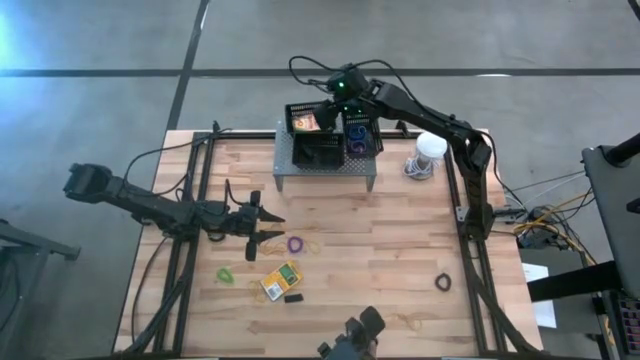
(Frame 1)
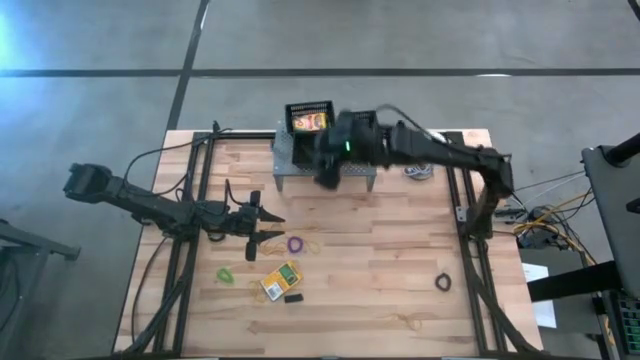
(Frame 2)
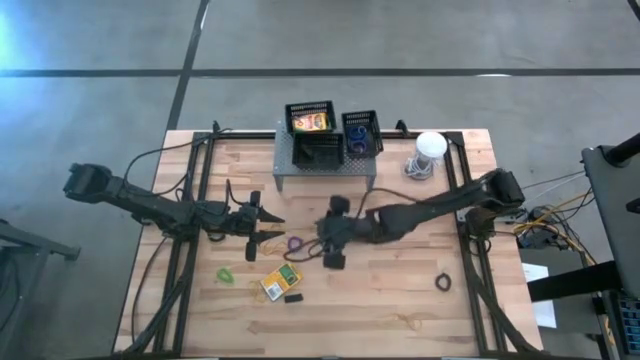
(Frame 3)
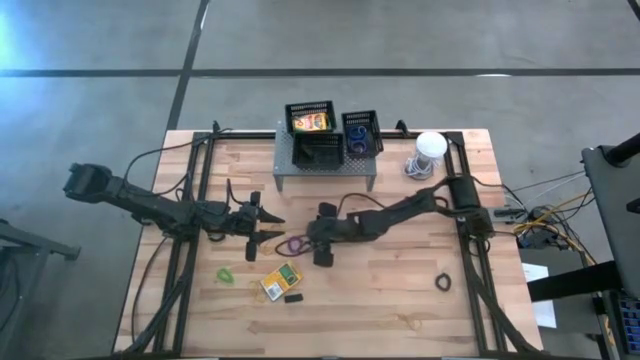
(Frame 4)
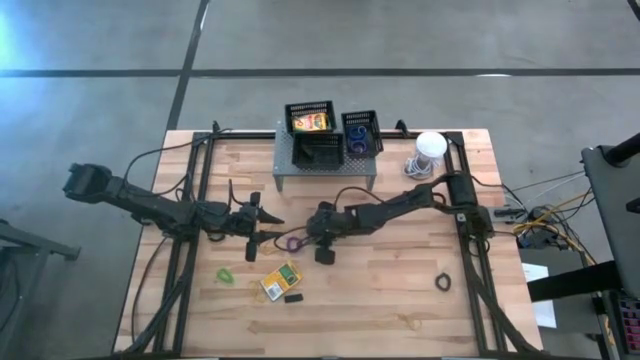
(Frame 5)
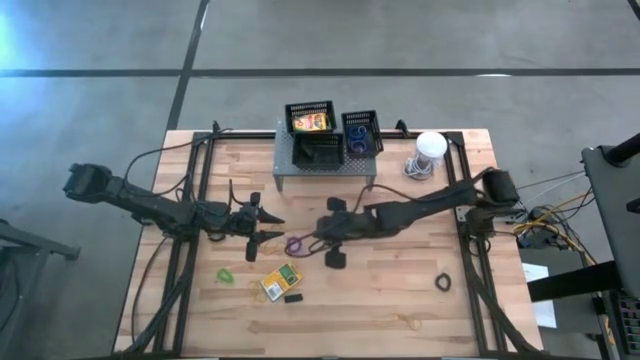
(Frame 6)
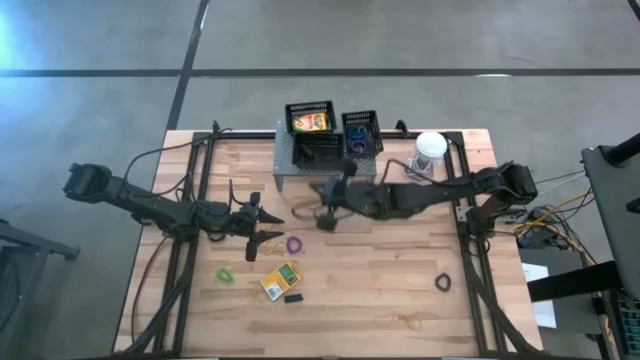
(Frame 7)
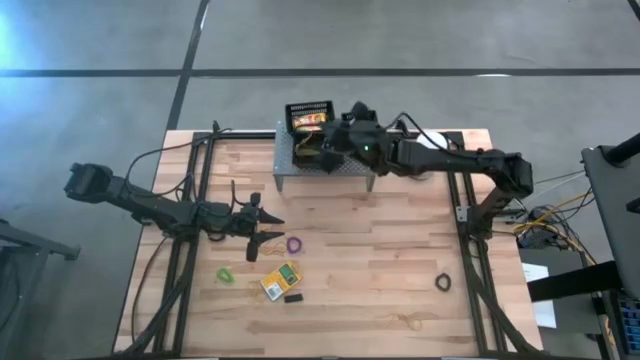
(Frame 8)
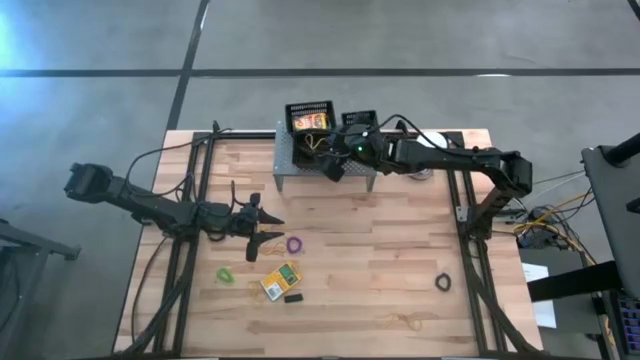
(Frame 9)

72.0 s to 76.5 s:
Task: Pick & Place Office Desk Supplies
Put the yellow rubber band into the bottom left black bin

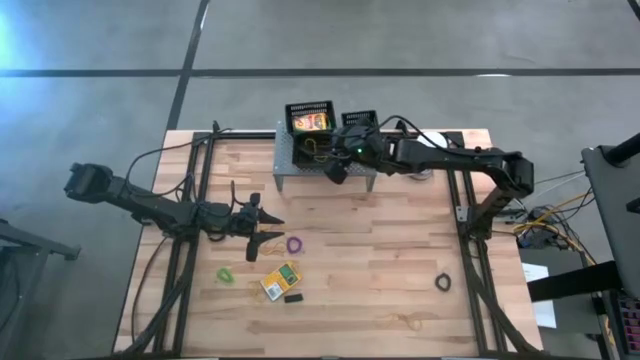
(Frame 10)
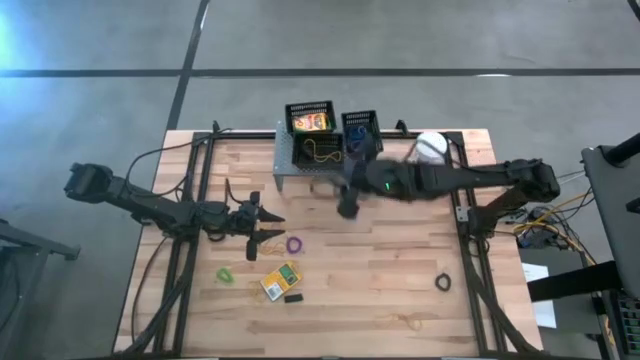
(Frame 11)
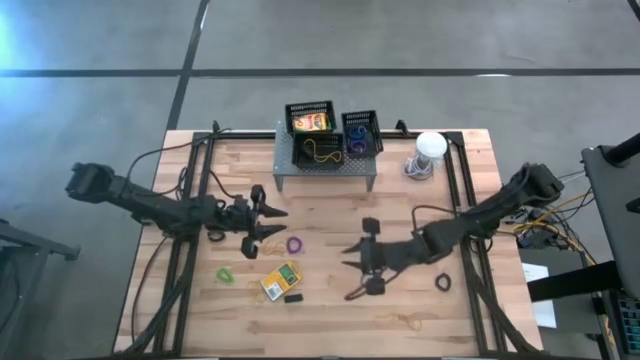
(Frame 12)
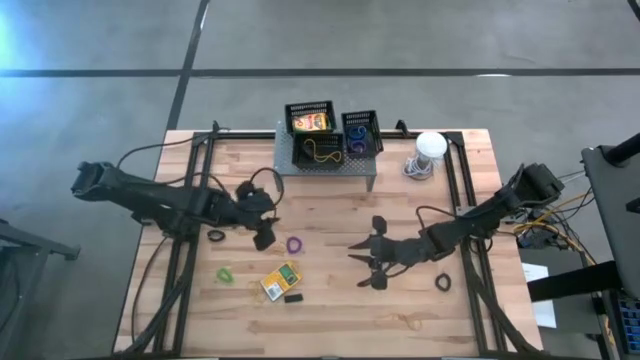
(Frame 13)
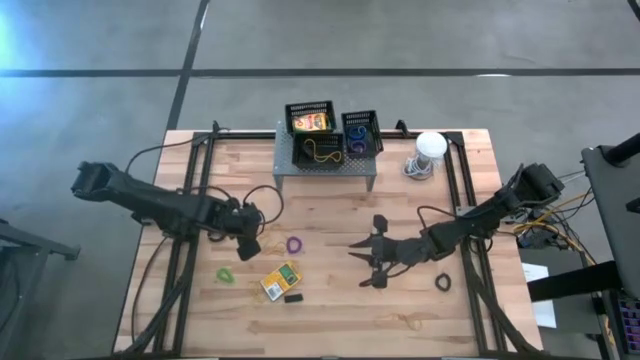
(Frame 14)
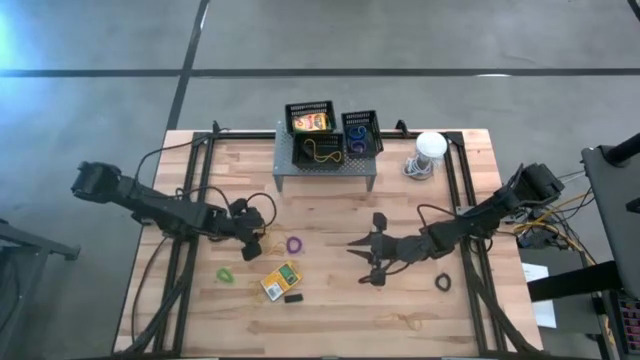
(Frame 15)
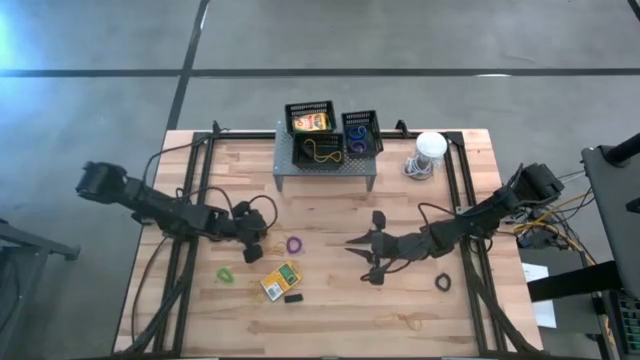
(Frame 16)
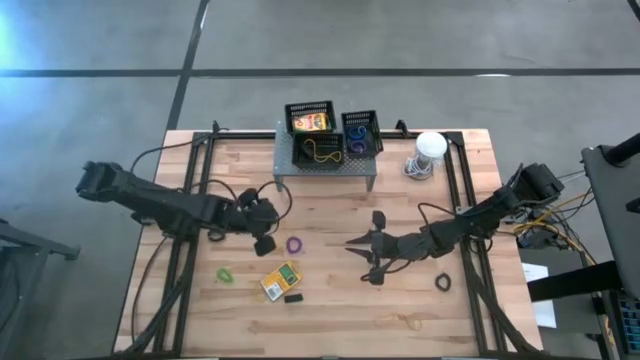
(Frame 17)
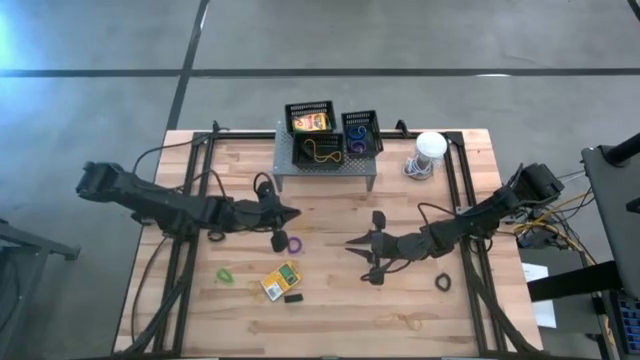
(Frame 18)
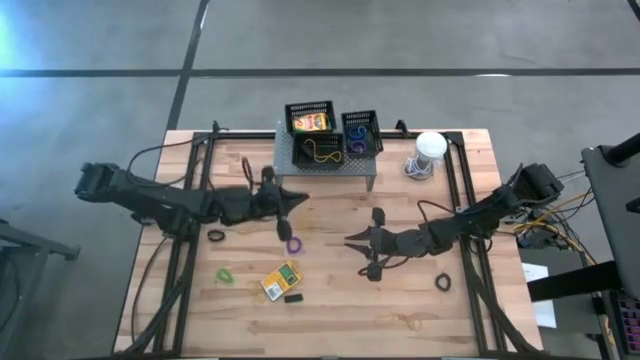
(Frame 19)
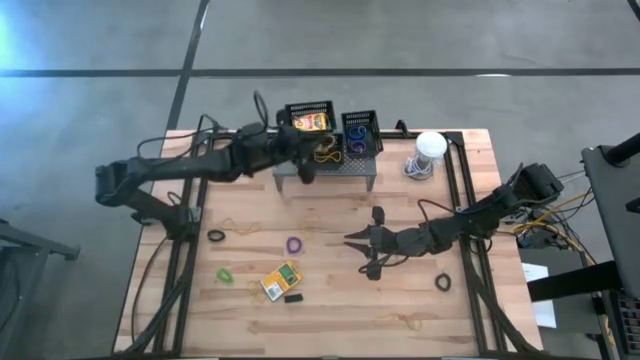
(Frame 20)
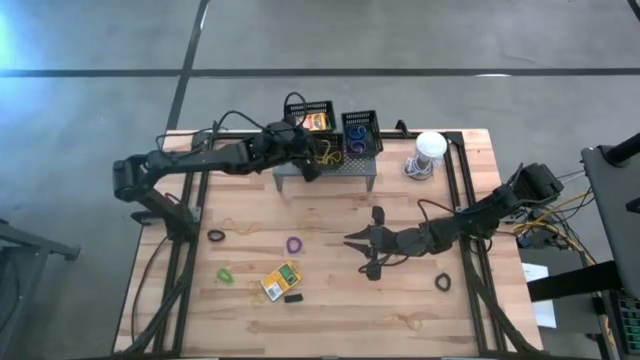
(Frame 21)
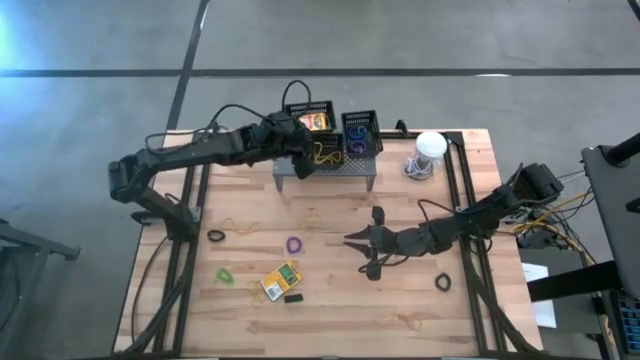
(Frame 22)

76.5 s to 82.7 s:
Put the yellow rubber band into the bottom left black bin

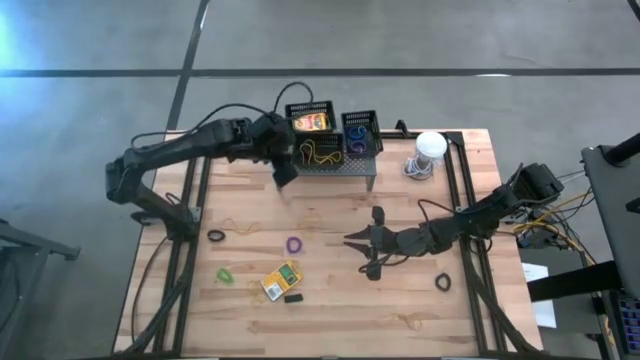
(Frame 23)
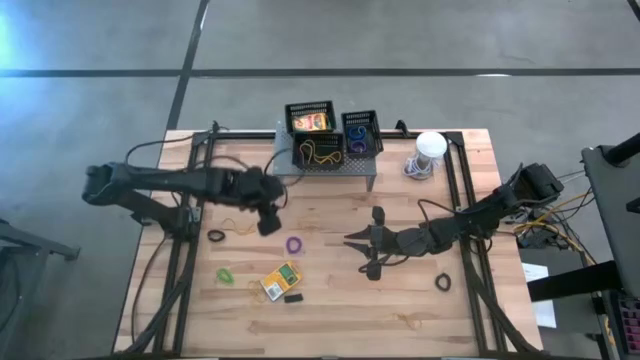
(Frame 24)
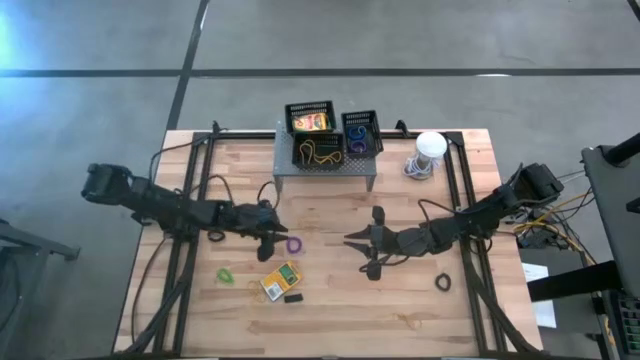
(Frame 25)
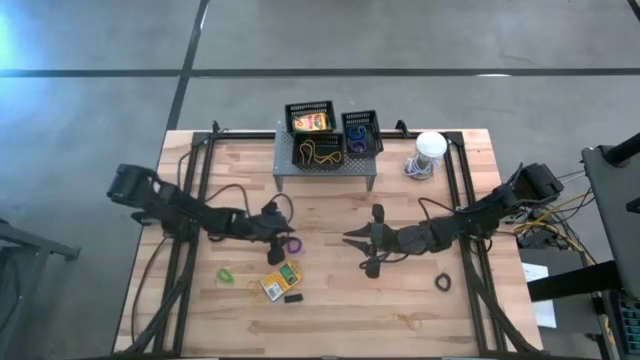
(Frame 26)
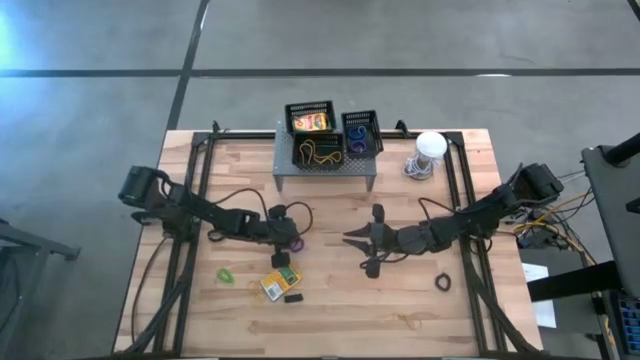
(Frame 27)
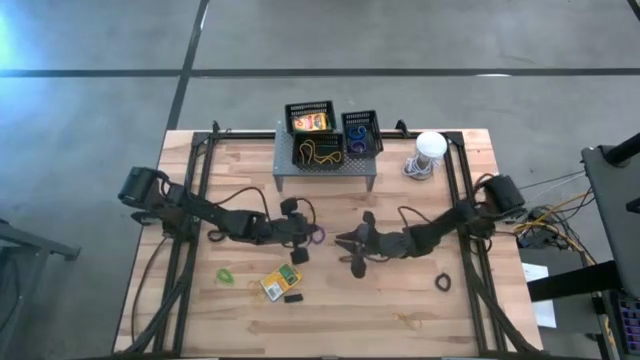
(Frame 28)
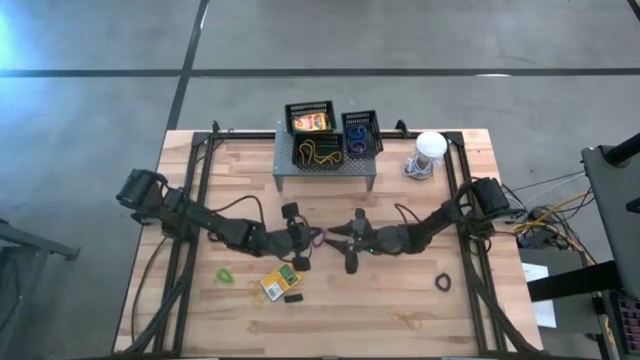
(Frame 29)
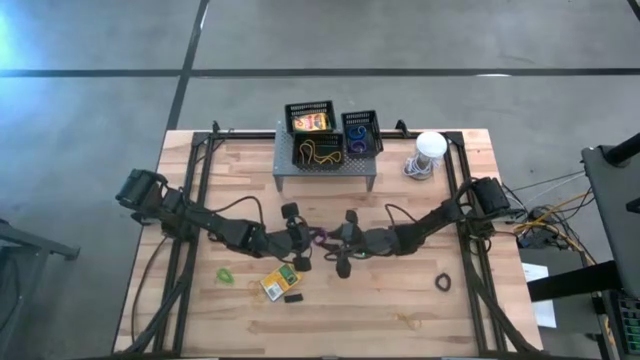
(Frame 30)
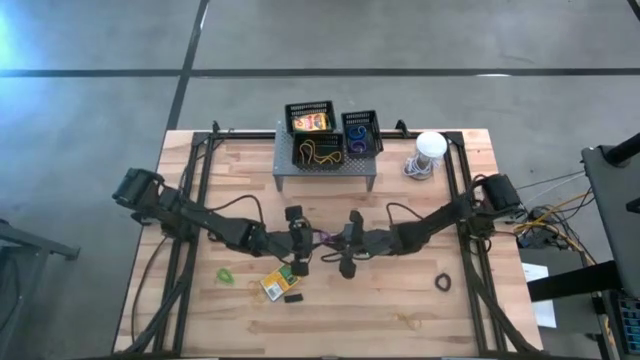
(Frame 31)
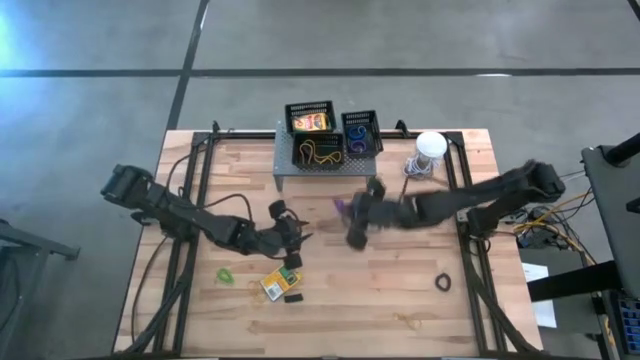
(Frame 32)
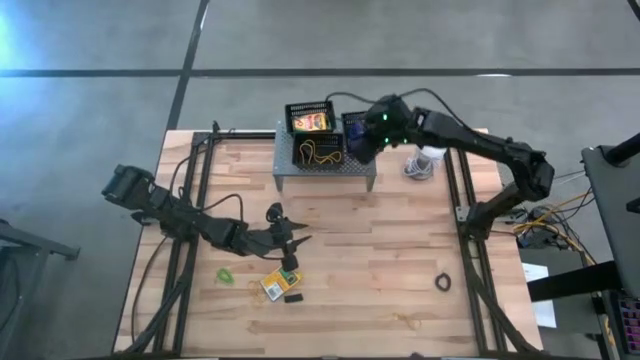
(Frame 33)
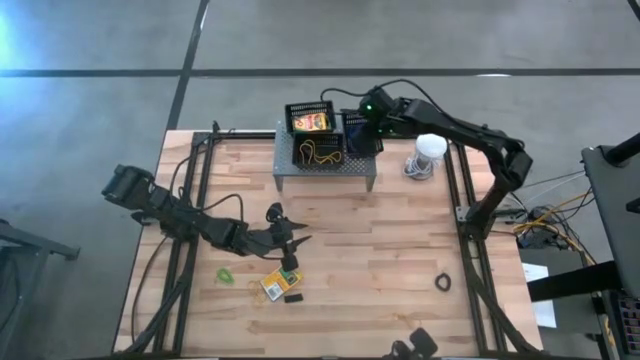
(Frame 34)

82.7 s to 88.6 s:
Put the violet spring keychain into the right black bin

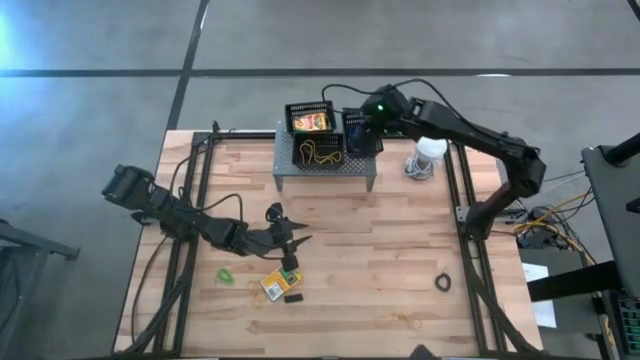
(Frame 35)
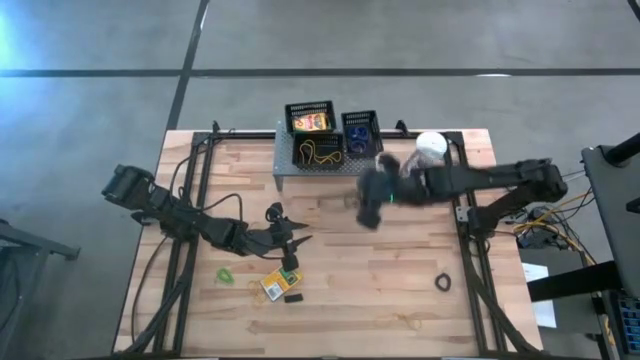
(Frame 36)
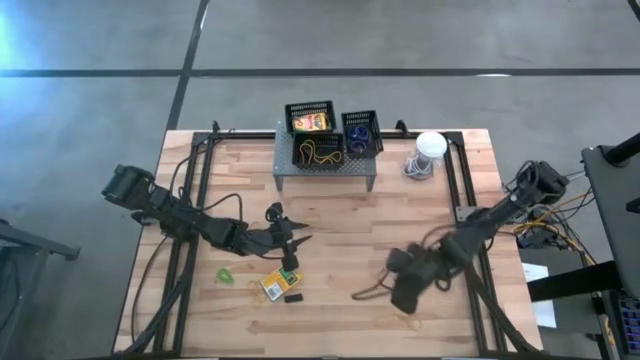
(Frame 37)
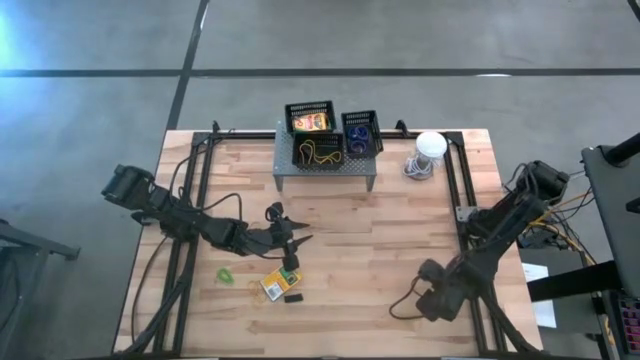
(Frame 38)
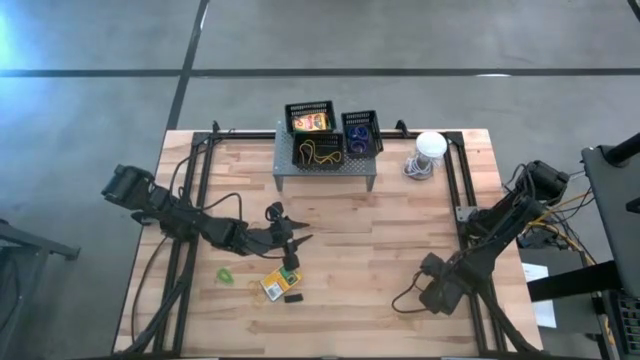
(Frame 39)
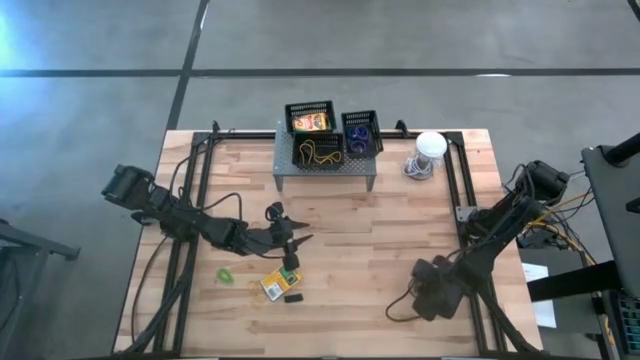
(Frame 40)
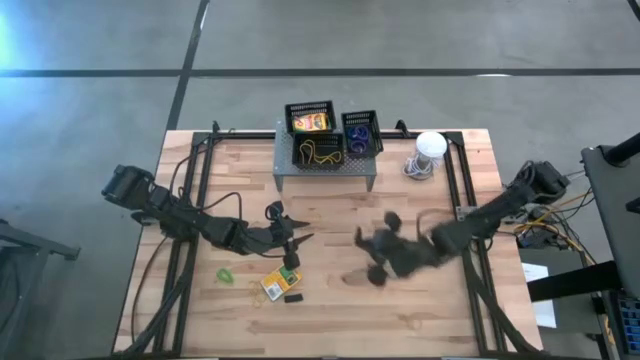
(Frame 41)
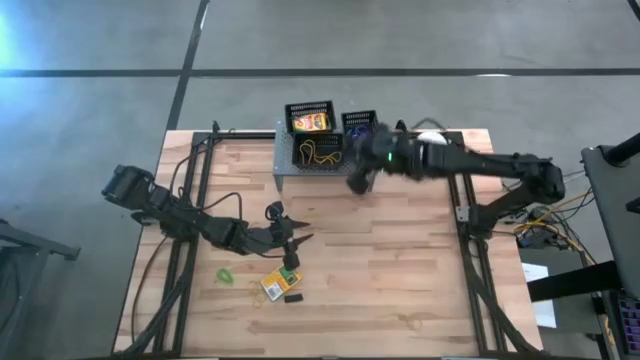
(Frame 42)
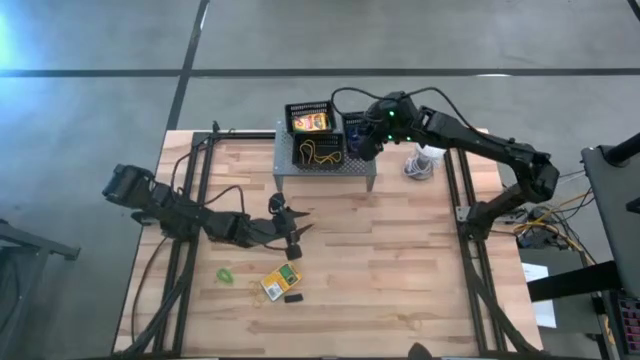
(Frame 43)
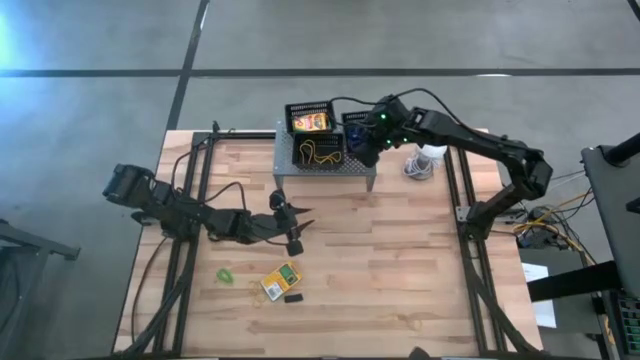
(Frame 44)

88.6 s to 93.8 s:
Put the black spring keychain into the right black bin
